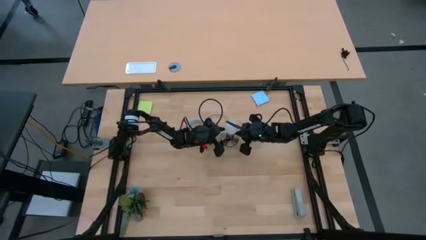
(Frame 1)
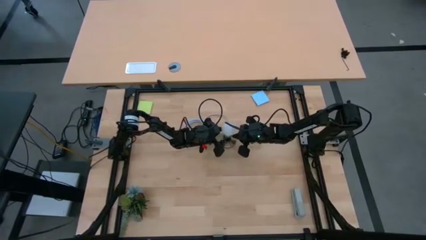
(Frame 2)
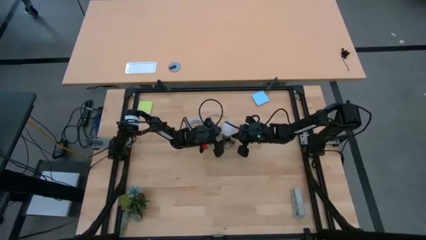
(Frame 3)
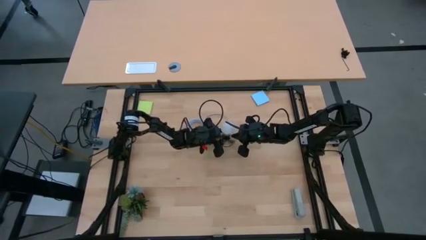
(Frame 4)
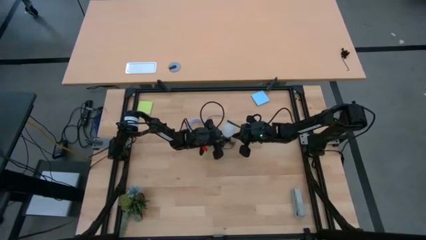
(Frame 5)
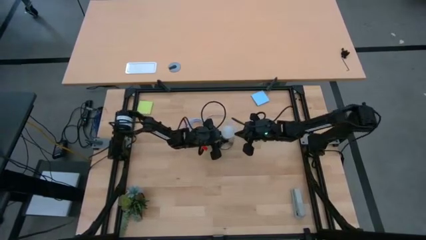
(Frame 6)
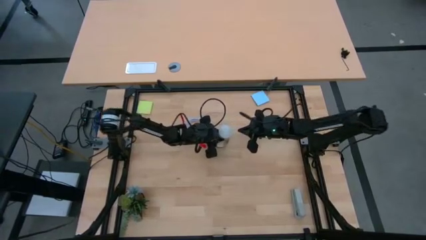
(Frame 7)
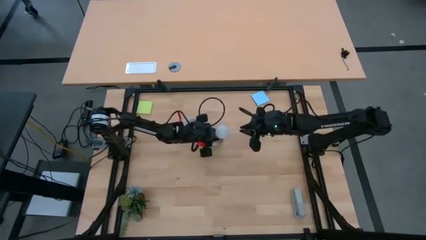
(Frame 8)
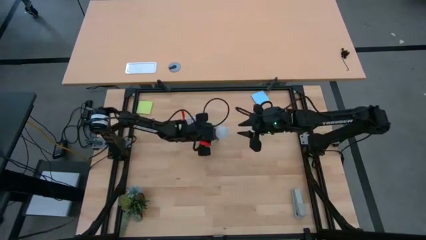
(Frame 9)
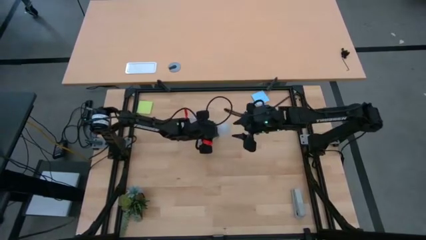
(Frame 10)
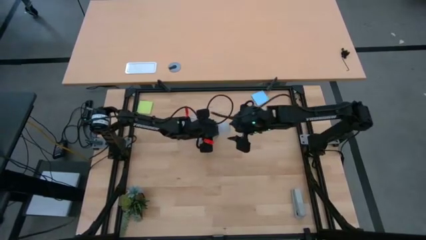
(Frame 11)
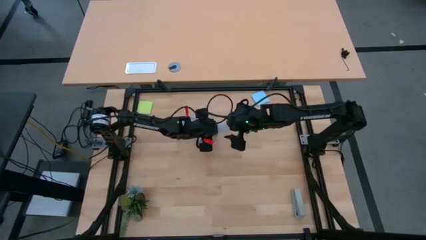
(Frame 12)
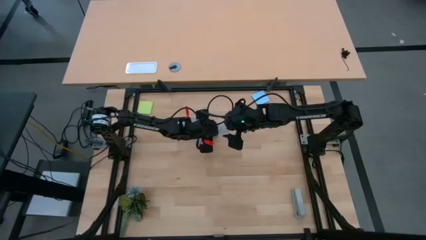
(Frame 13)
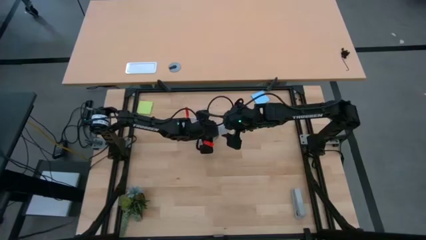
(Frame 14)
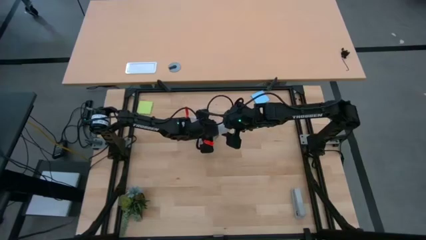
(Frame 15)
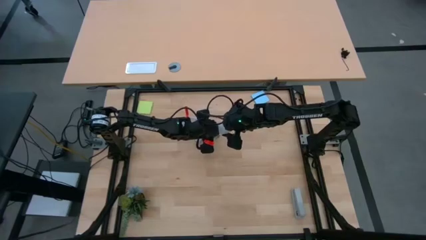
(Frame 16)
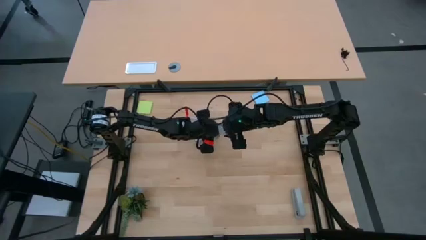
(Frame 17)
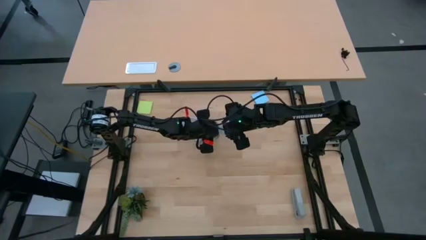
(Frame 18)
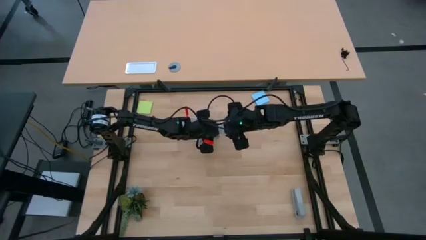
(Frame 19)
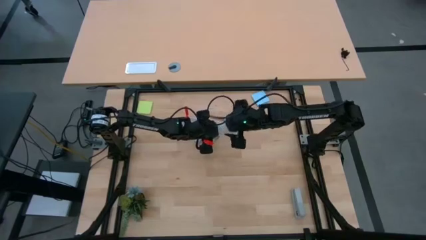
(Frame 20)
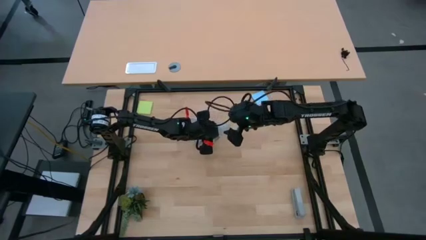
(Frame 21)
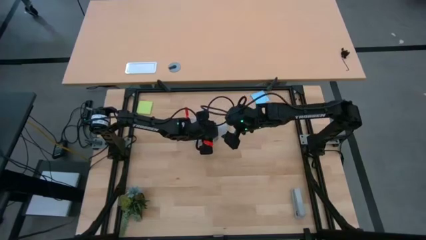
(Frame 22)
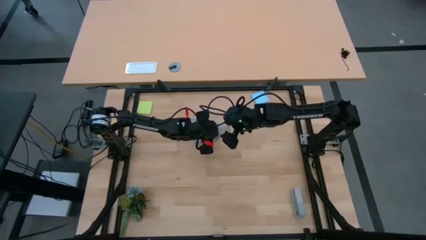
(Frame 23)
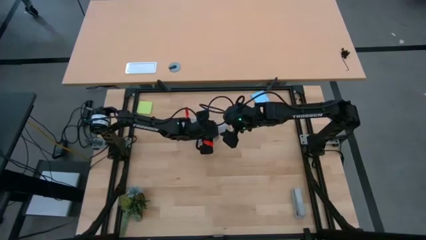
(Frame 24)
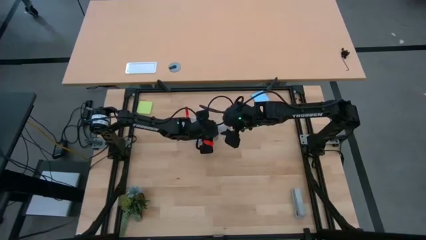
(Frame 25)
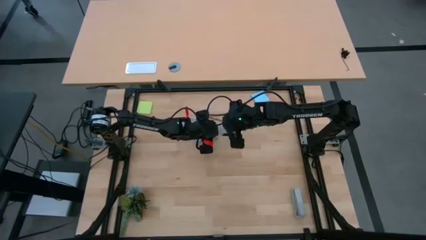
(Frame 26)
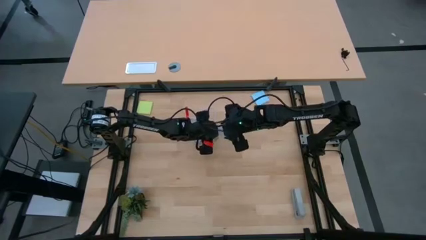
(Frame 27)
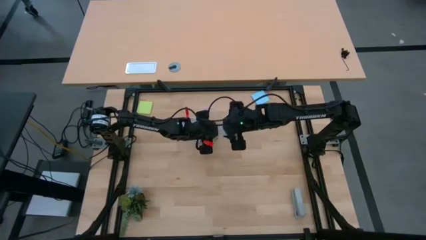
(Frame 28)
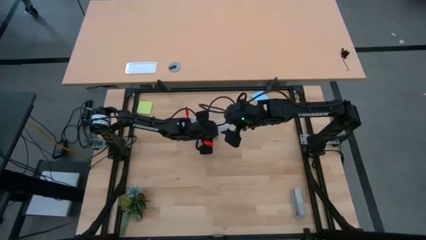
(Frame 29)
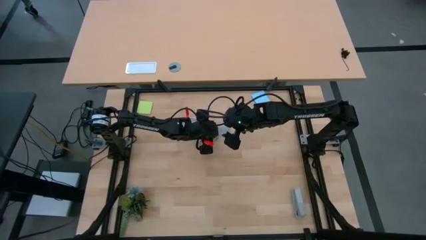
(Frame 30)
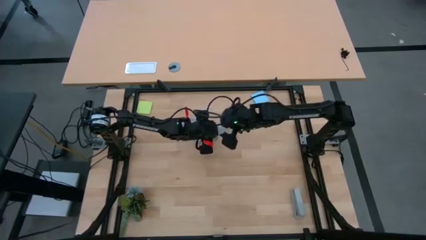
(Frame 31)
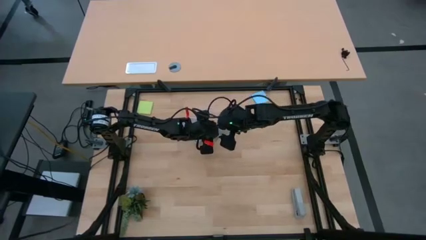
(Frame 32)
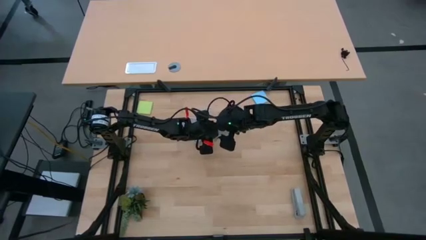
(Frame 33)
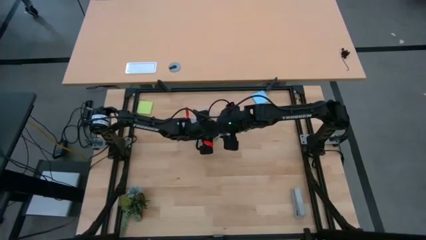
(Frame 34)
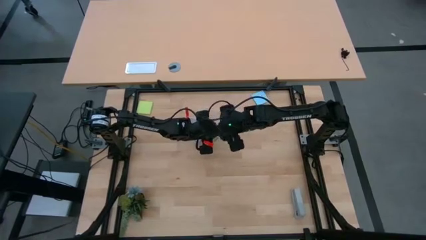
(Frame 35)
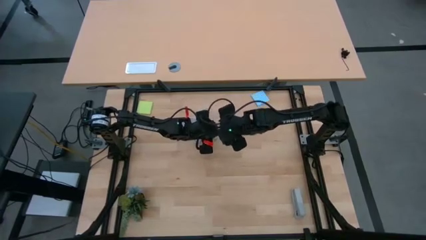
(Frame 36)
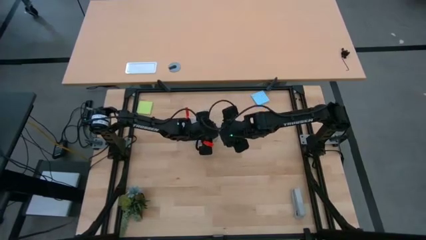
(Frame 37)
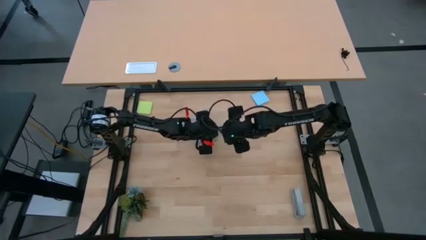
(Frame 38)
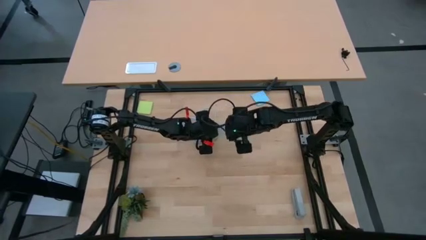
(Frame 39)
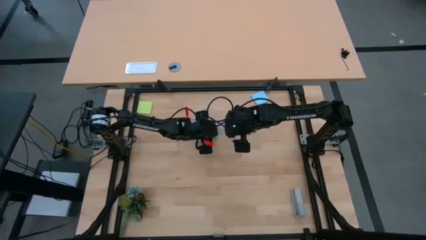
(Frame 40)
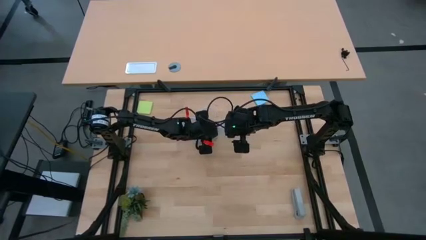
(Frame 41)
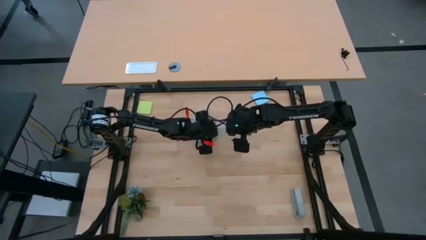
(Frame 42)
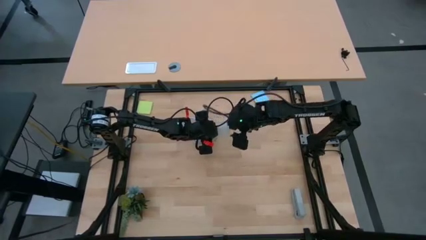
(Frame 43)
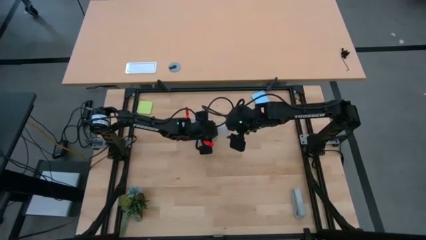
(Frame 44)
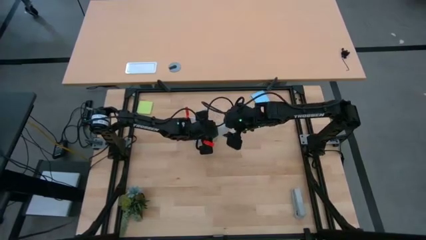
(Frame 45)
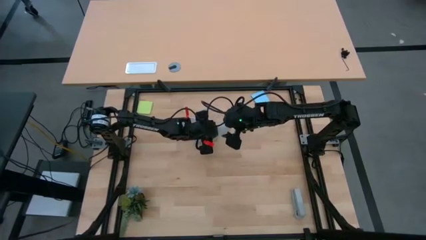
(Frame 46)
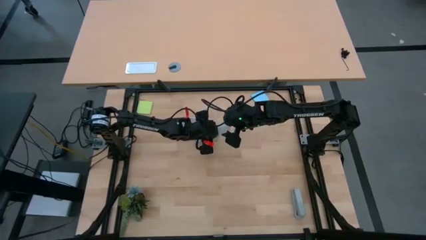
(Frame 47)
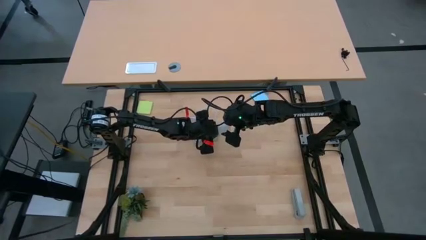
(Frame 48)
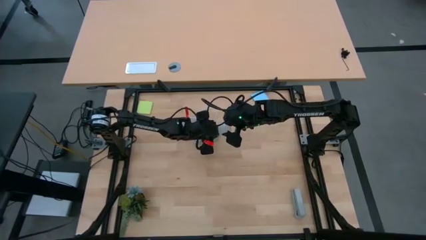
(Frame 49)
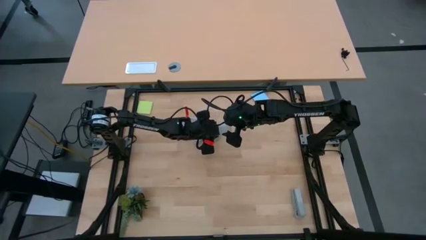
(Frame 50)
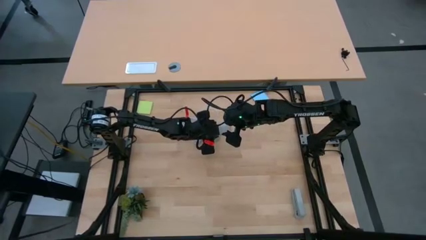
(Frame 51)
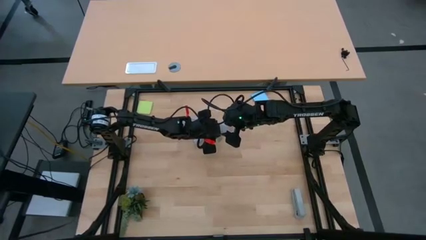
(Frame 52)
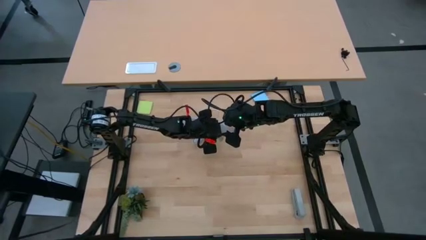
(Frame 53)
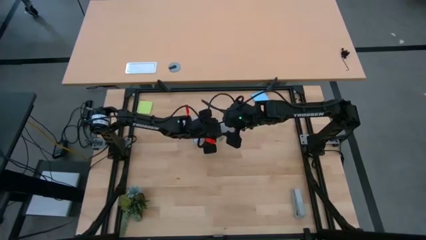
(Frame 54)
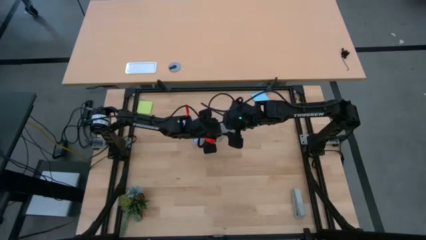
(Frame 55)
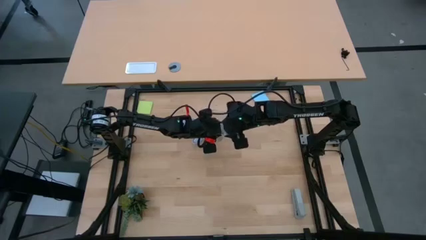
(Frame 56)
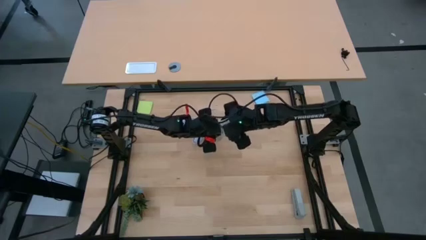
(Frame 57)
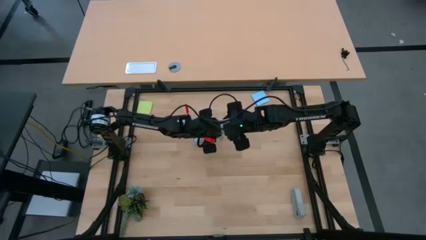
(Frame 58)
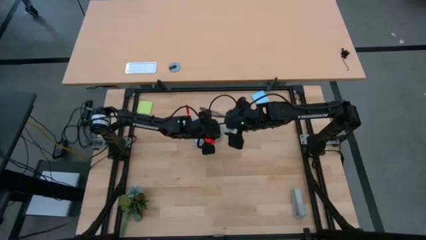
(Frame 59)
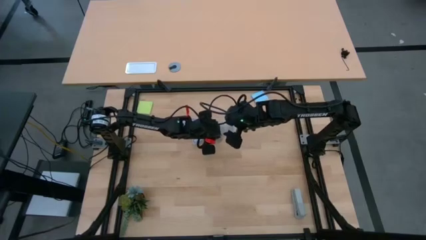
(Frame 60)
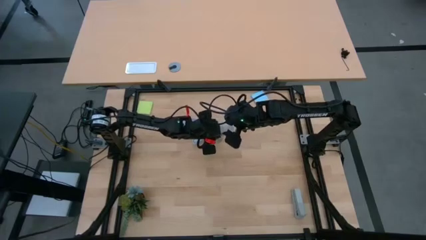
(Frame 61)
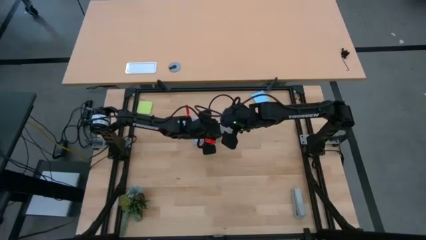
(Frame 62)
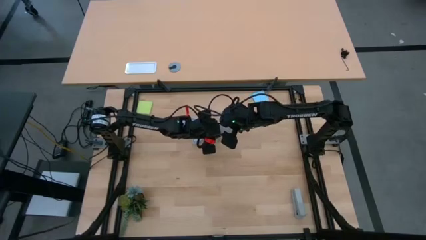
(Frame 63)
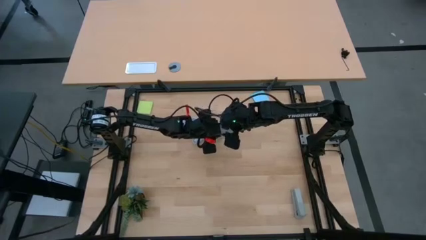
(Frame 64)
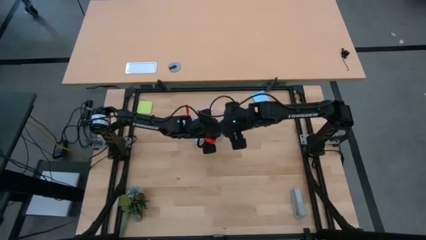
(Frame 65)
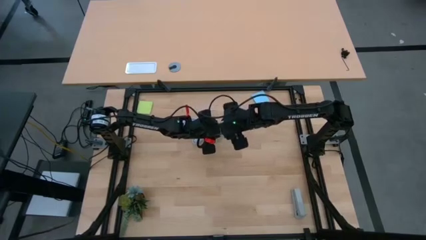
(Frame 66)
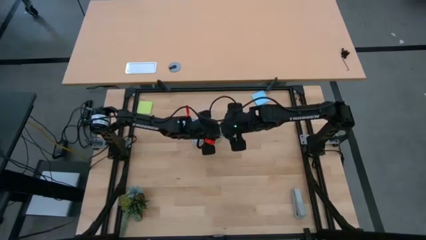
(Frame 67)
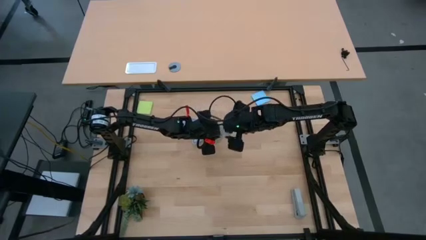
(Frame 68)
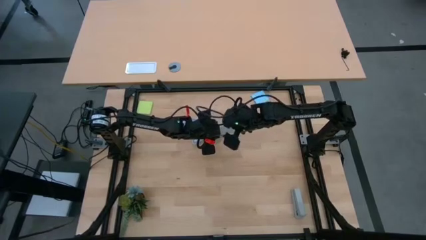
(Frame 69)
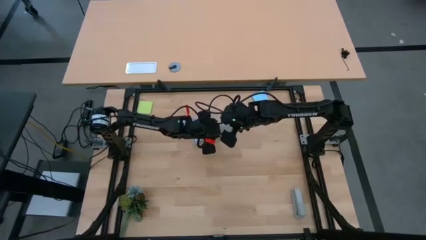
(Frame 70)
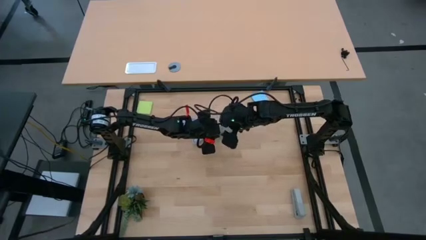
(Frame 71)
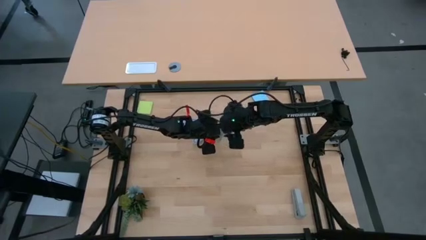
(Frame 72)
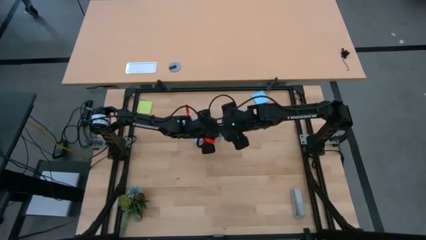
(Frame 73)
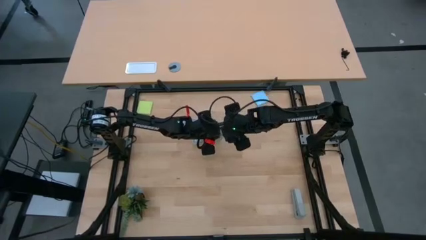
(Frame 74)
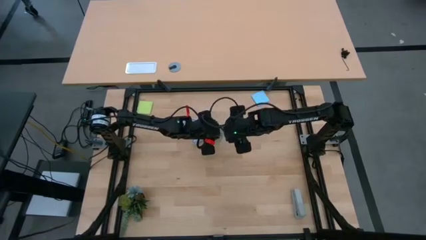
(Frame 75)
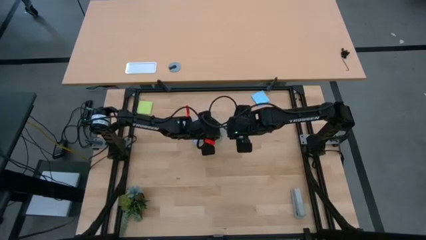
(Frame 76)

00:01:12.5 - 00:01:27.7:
Task: Screw lightbulb
Remove the light bulb from the lamp
